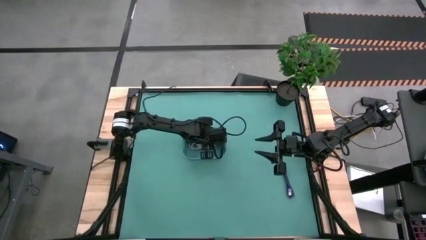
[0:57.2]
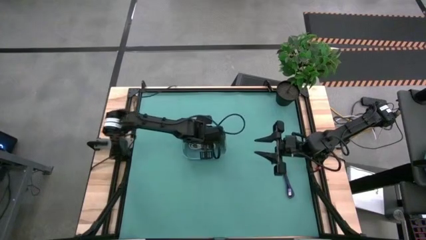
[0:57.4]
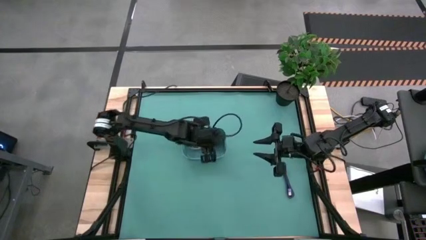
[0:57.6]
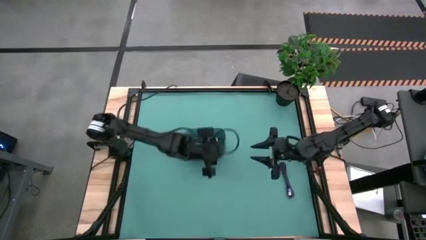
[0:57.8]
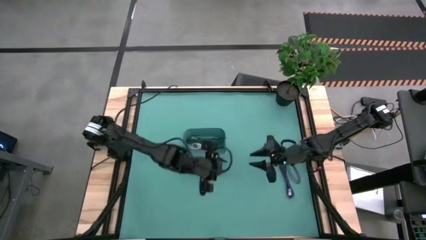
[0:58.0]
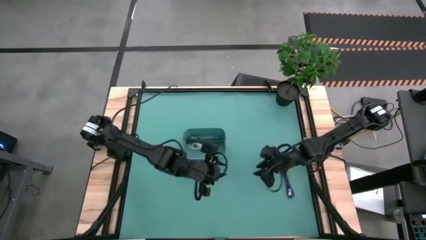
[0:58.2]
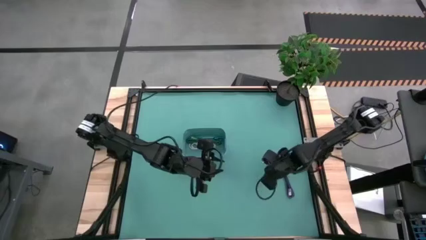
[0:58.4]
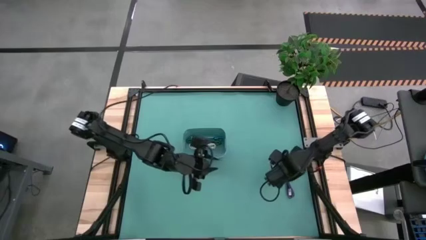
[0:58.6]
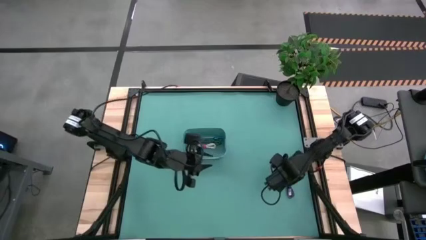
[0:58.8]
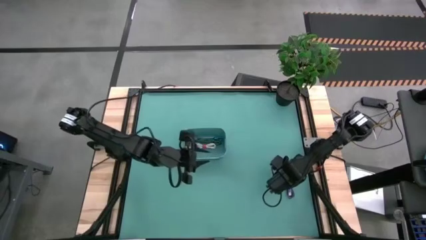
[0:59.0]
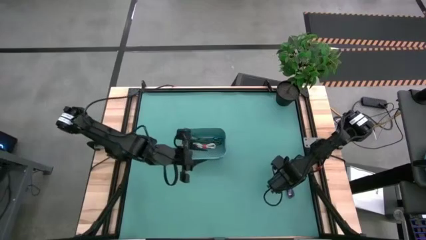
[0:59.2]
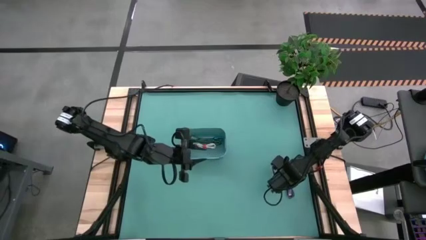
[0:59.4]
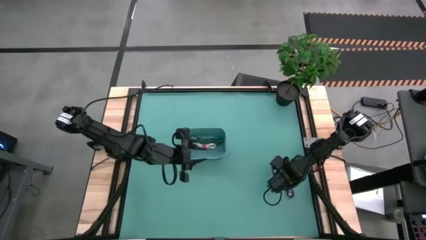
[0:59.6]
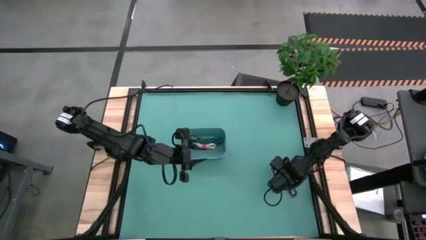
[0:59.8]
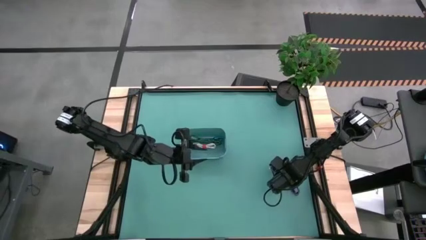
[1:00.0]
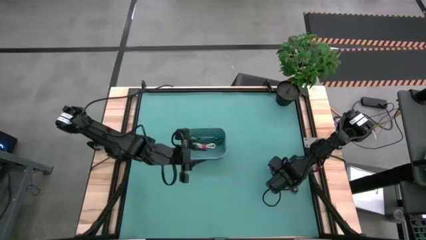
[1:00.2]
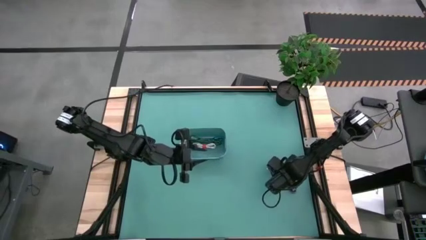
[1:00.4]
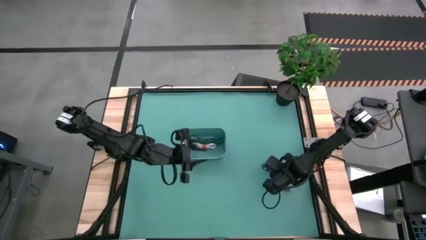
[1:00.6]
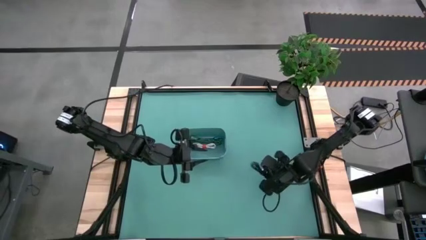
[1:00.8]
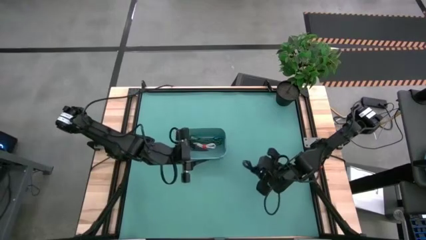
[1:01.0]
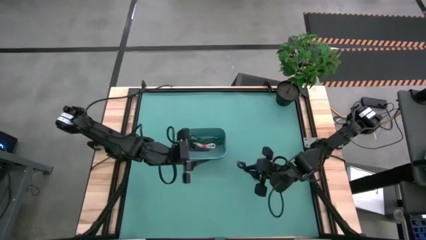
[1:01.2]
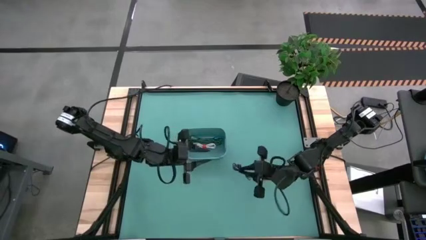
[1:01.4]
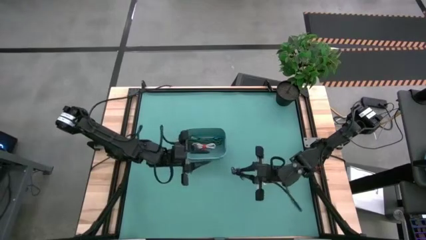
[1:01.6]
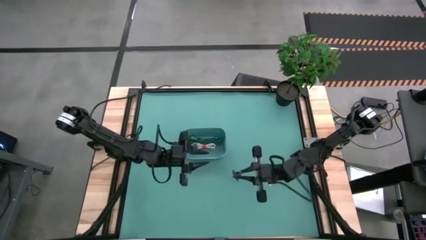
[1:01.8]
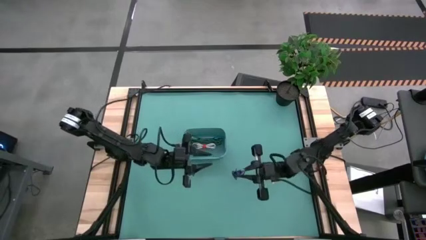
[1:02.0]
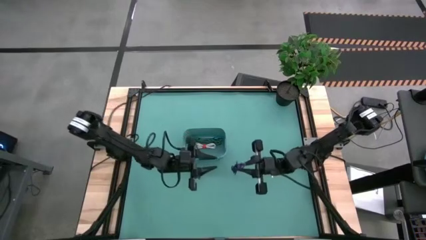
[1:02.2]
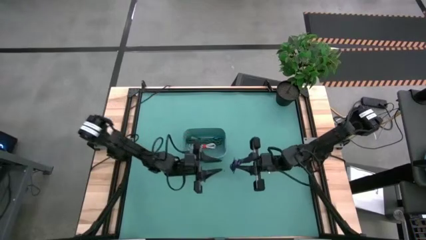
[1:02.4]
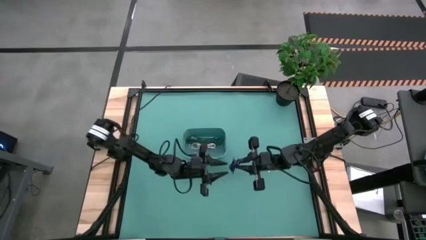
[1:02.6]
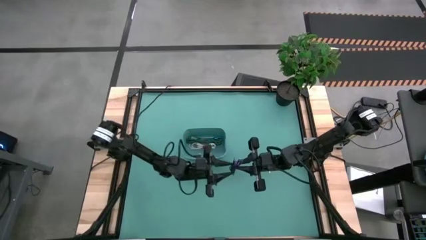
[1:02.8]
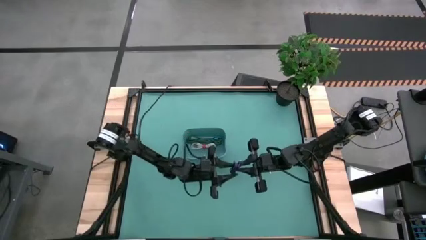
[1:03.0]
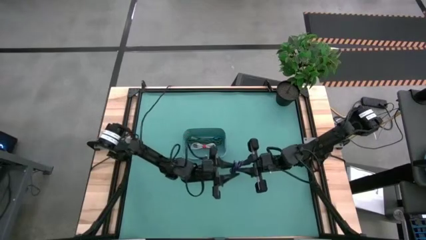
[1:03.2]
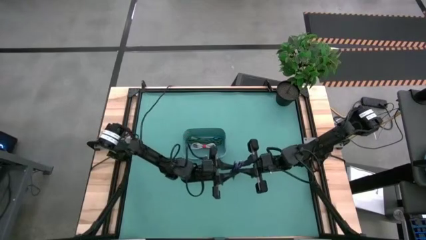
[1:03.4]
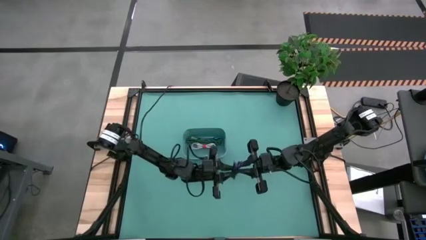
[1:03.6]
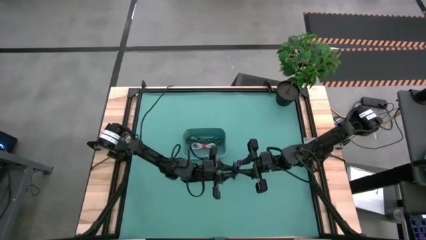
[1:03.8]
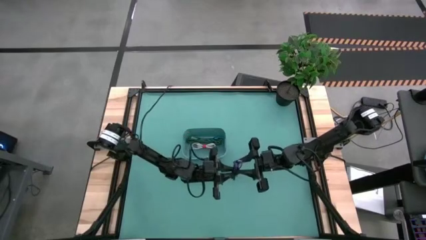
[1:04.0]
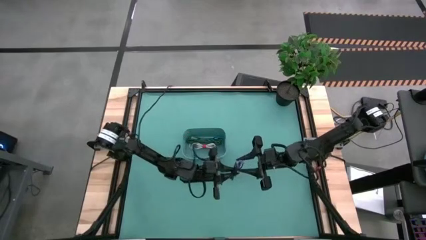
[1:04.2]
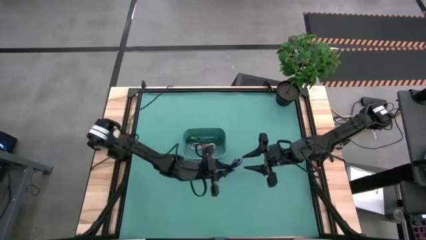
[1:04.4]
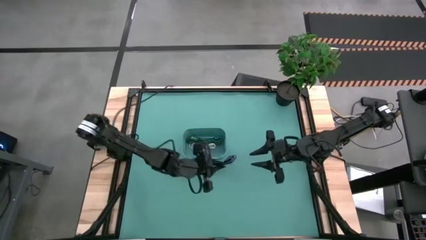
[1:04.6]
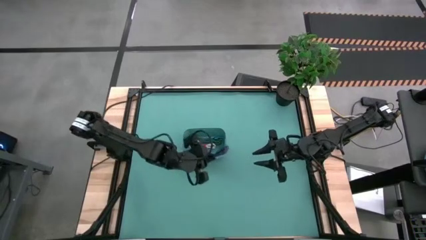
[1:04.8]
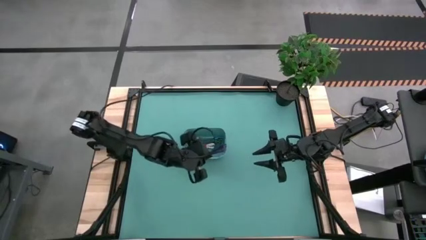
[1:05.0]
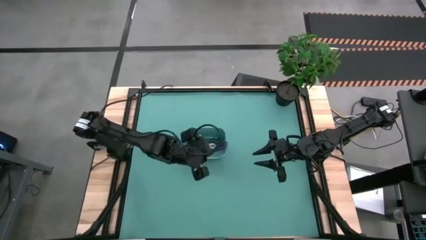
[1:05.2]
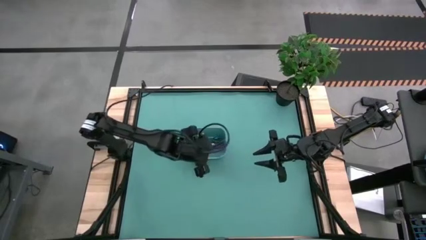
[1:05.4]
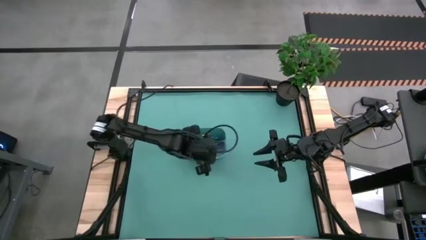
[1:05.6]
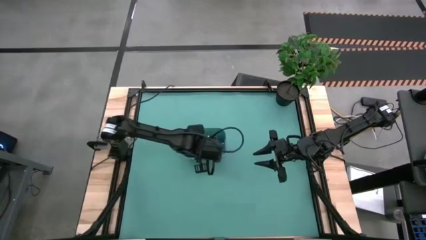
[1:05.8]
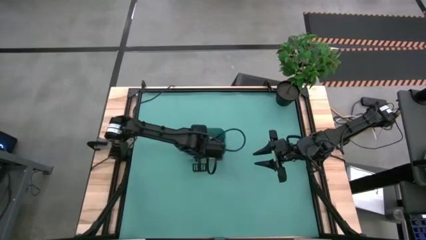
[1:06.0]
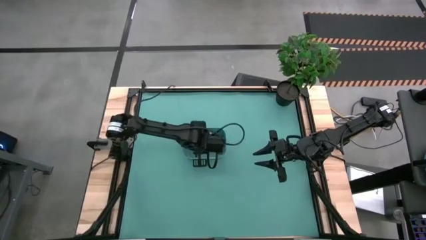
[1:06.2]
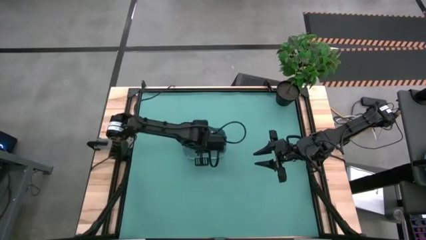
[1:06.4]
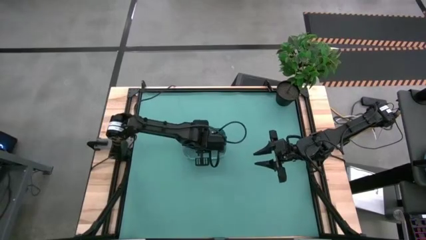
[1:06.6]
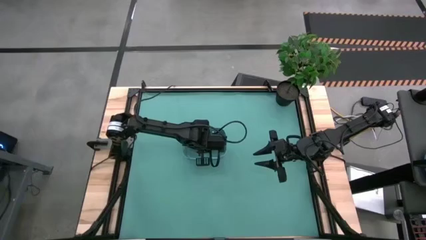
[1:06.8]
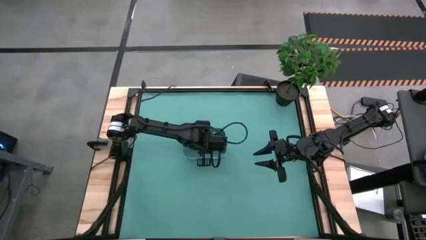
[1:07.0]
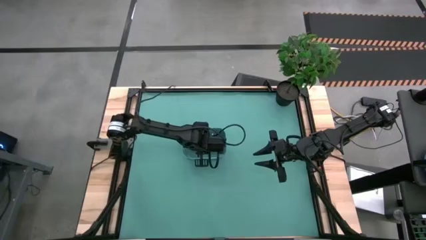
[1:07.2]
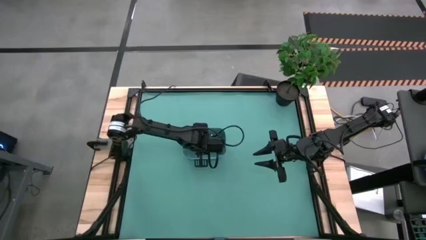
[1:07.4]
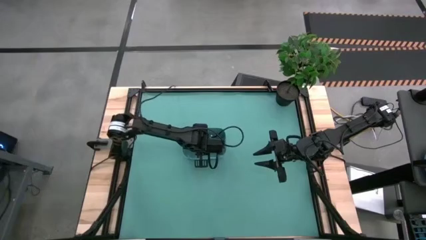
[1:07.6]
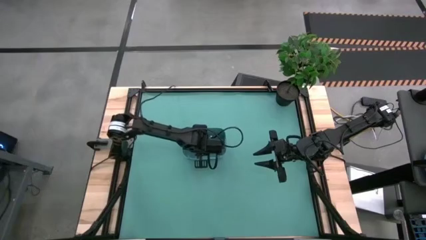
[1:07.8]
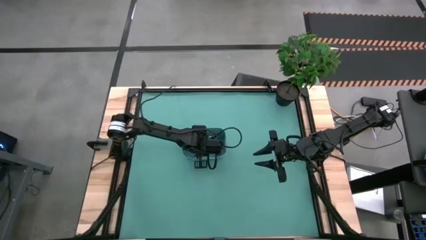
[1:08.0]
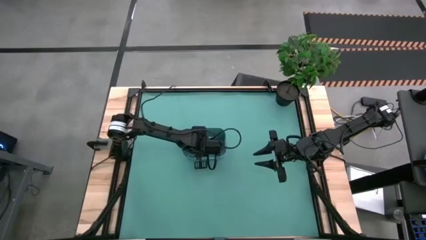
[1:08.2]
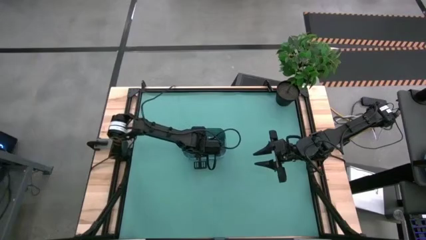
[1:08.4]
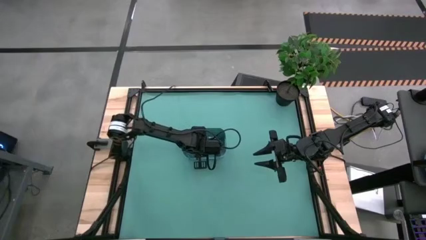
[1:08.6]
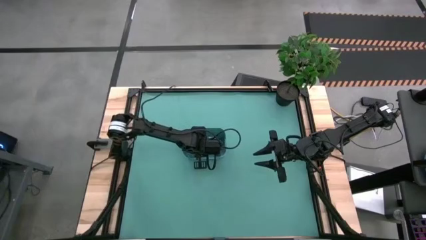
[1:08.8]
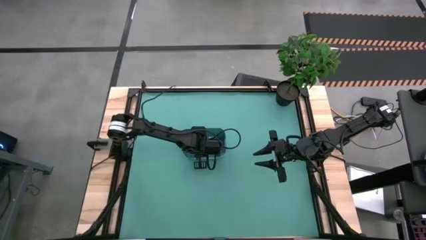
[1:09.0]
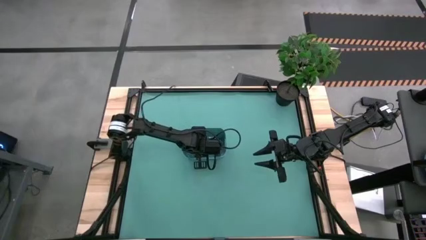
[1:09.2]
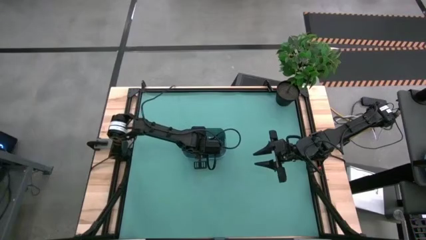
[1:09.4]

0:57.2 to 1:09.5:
Task: Pick and place USB-C Cables
Put the violet black charger cable into the green bin

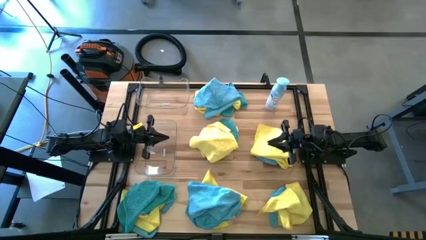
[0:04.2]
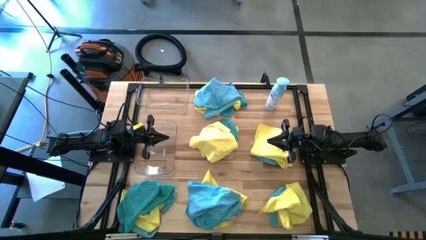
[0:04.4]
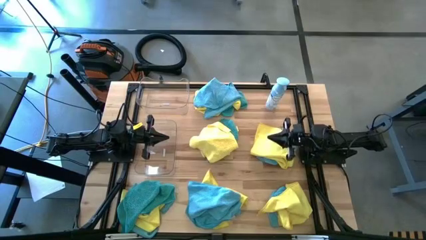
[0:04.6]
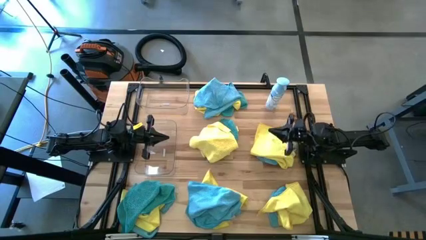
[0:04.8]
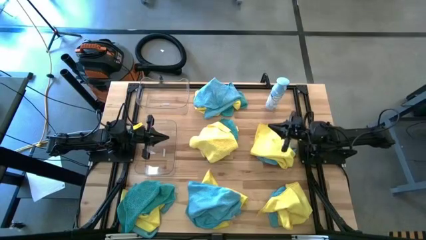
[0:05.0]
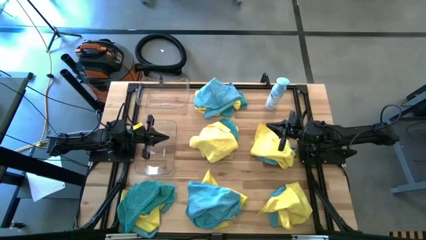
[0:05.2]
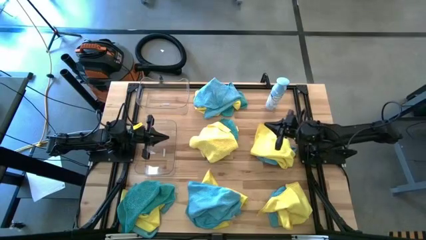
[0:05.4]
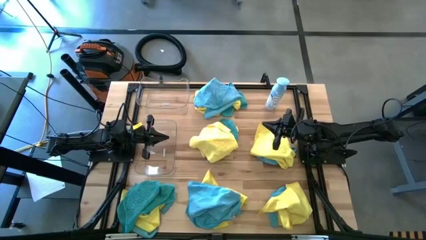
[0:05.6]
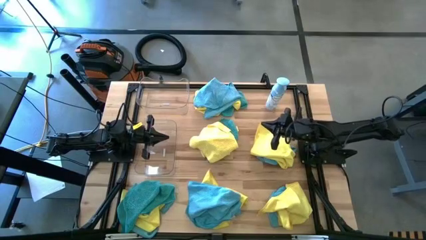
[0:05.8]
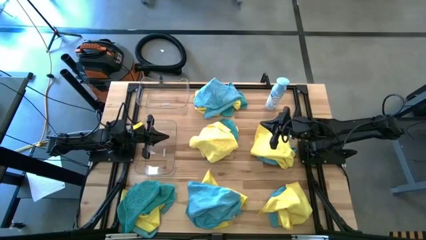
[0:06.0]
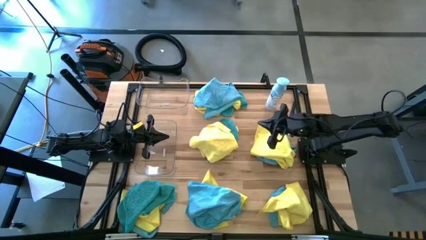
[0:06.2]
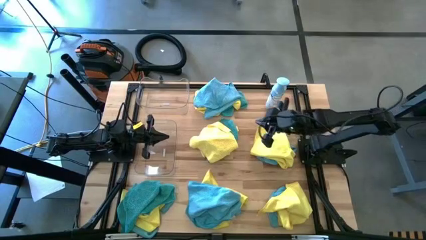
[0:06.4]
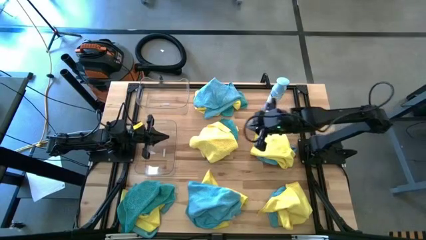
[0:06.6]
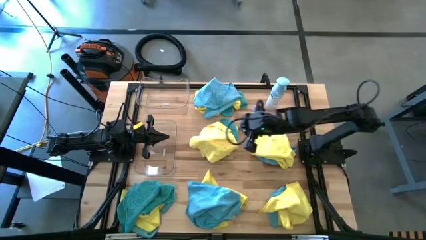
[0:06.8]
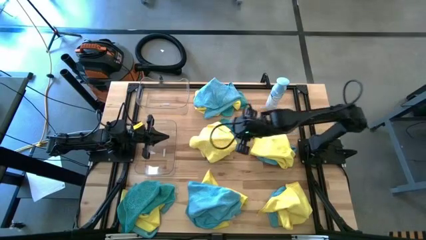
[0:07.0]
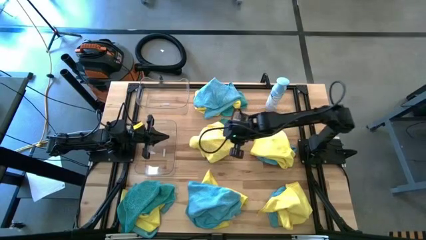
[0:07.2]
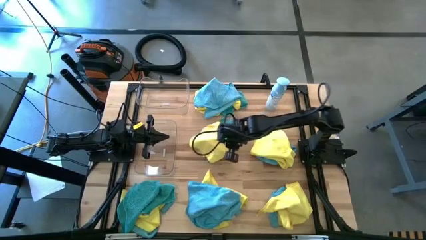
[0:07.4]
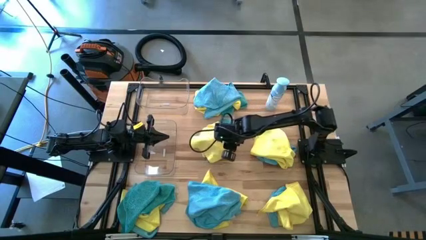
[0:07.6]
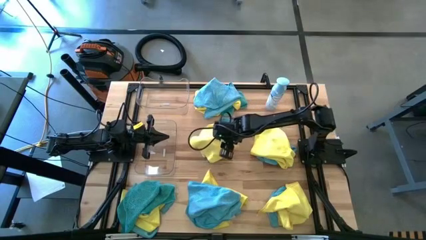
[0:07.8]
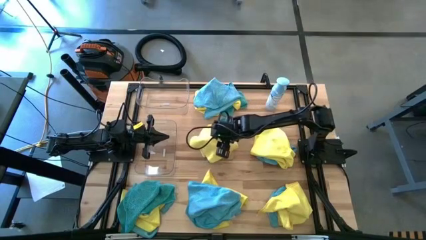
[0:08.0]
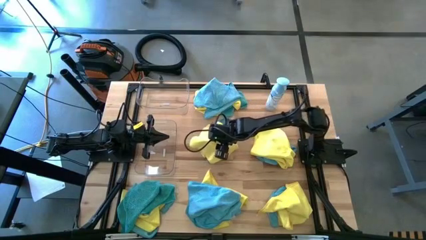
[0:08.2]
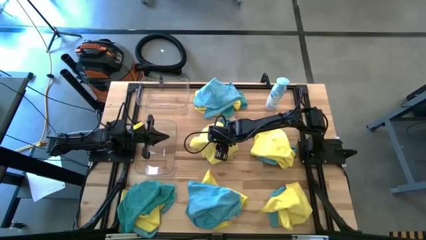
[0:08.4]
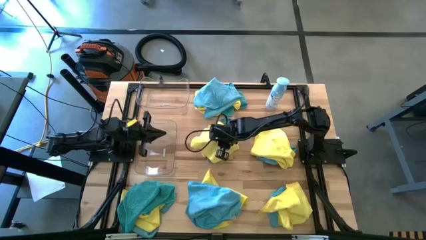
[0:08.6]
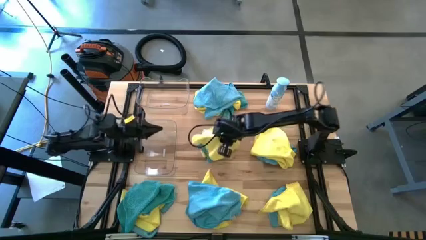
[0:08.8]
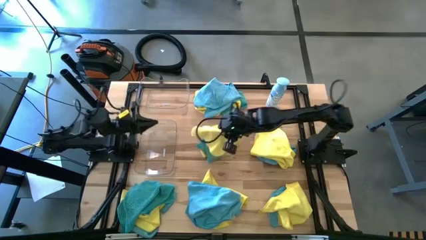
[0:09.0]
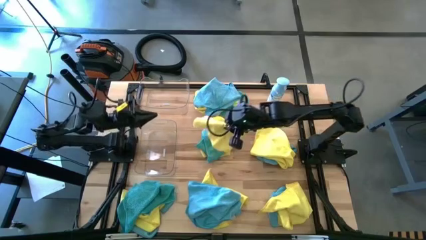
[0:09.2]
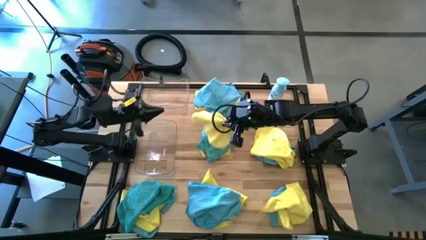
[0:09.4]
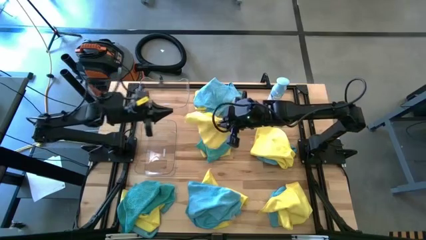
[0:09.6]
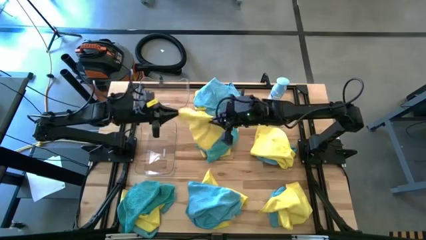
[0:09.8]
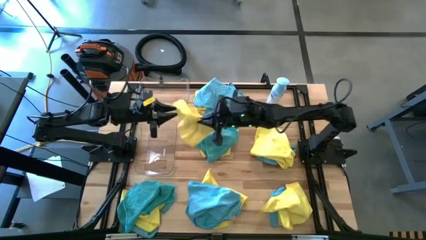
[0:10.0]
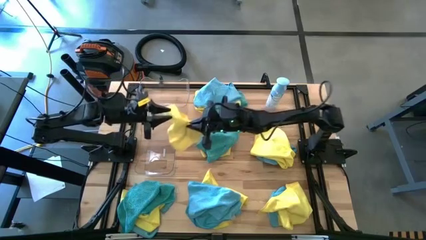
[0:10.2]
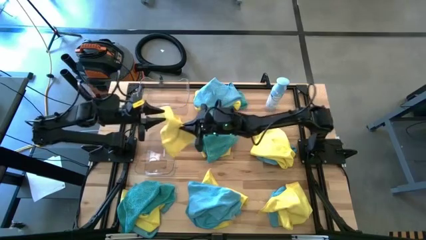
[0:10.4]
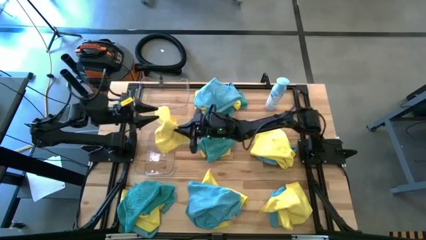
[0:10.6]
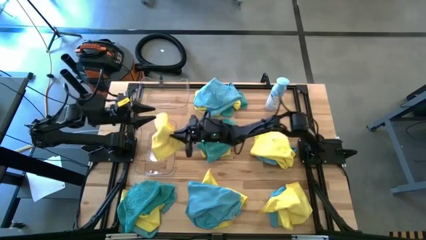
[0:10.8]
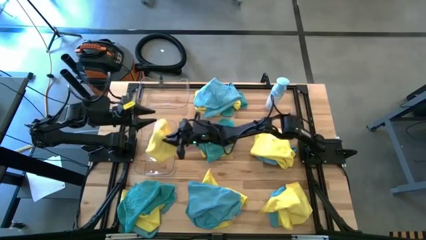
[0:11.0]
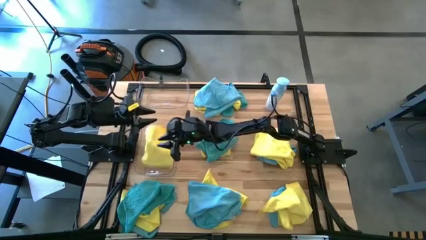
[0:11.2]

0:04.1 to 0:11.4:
Task: Sort microfiber towel by color & place in baskets
Put the yellow towel into the bottom transparent bin
